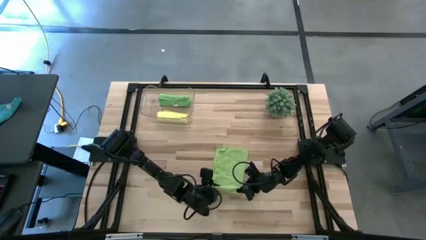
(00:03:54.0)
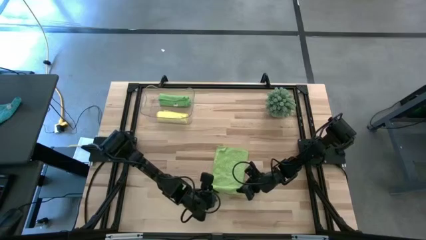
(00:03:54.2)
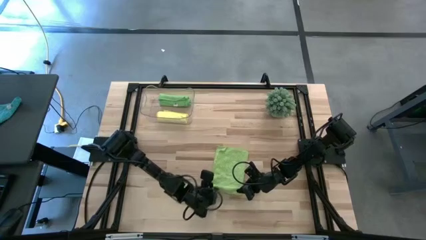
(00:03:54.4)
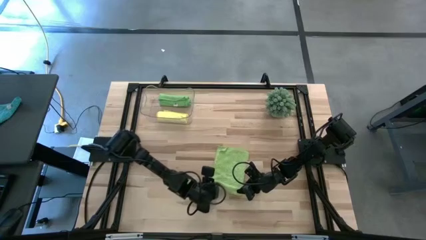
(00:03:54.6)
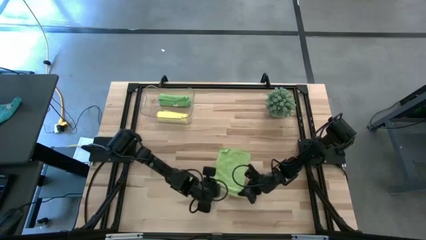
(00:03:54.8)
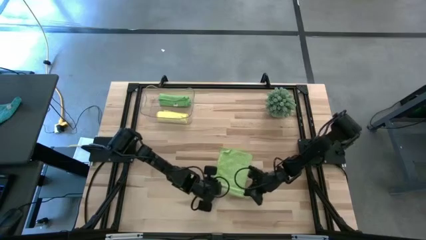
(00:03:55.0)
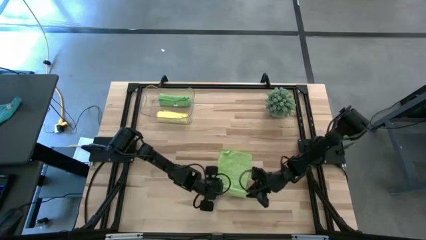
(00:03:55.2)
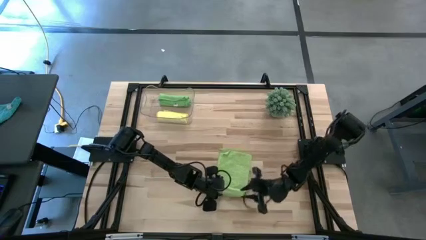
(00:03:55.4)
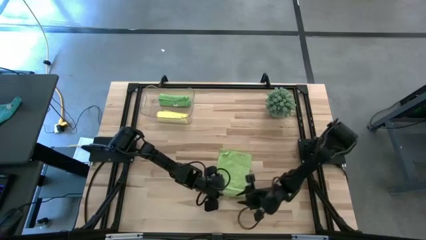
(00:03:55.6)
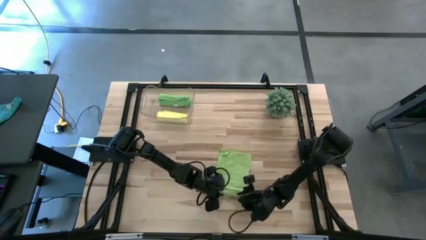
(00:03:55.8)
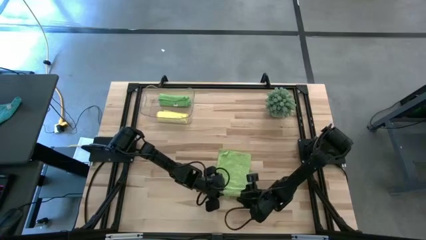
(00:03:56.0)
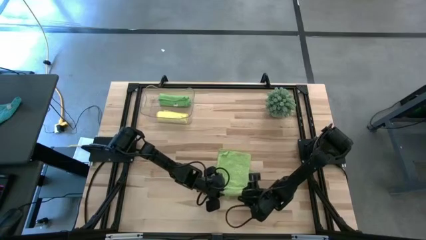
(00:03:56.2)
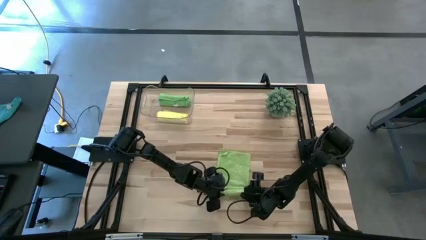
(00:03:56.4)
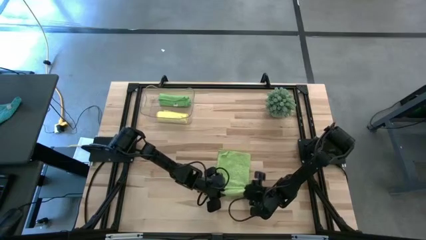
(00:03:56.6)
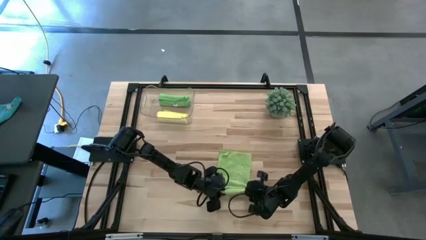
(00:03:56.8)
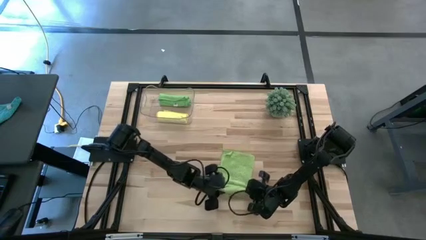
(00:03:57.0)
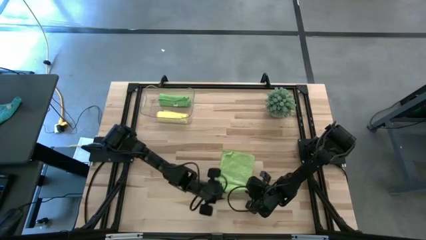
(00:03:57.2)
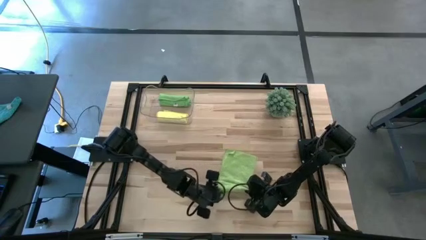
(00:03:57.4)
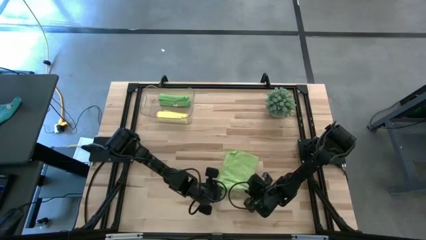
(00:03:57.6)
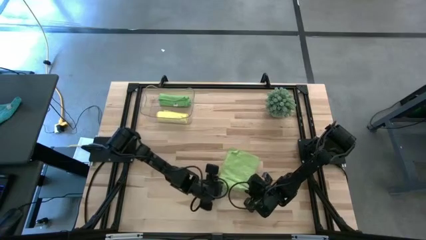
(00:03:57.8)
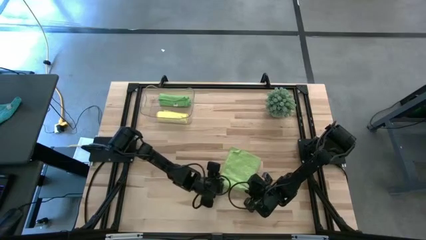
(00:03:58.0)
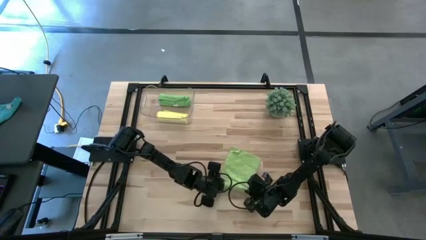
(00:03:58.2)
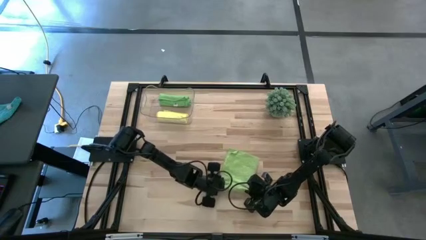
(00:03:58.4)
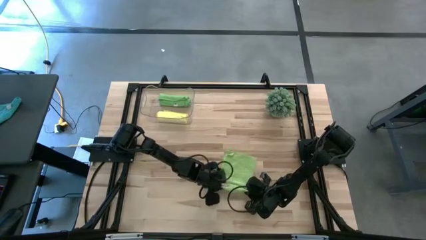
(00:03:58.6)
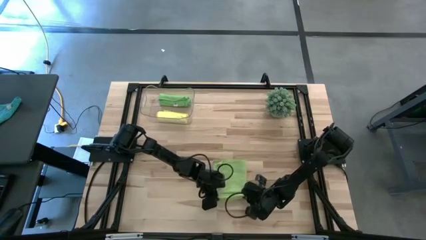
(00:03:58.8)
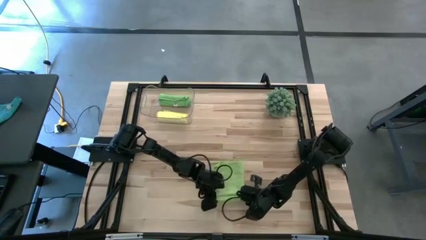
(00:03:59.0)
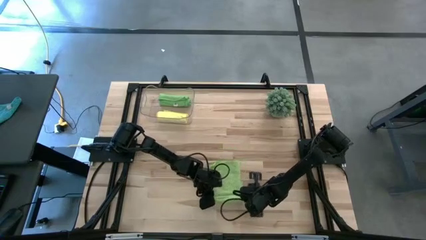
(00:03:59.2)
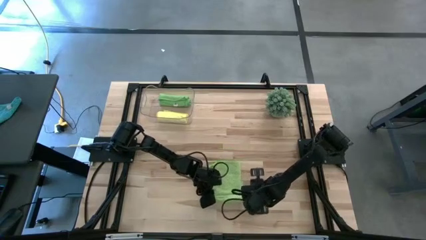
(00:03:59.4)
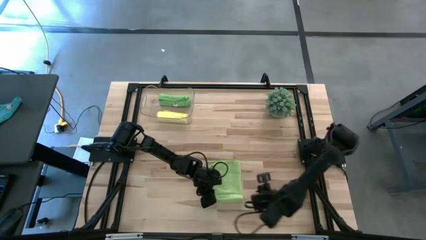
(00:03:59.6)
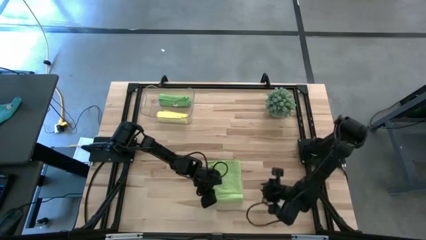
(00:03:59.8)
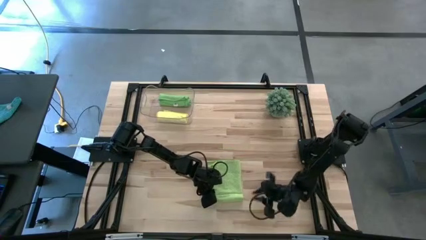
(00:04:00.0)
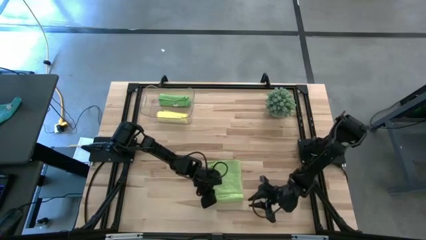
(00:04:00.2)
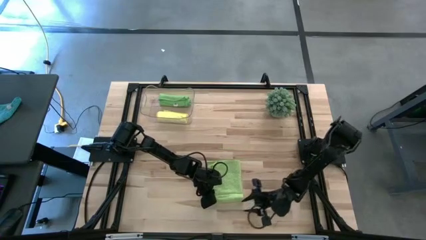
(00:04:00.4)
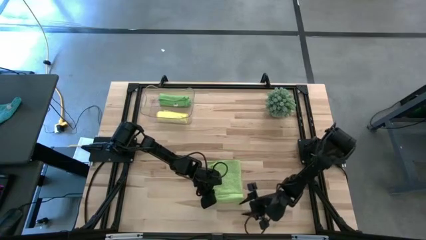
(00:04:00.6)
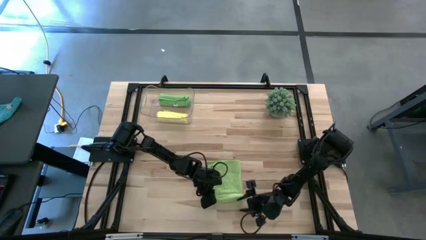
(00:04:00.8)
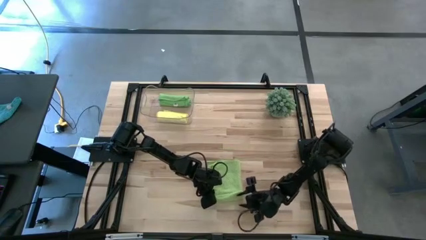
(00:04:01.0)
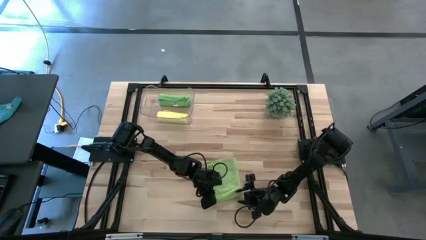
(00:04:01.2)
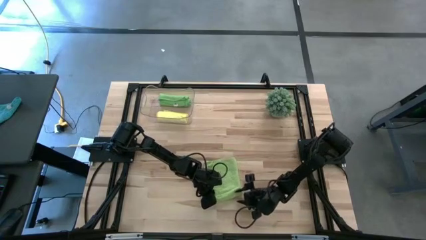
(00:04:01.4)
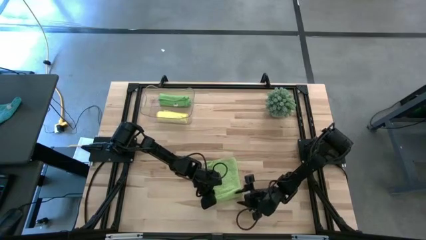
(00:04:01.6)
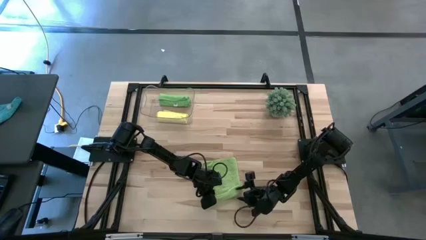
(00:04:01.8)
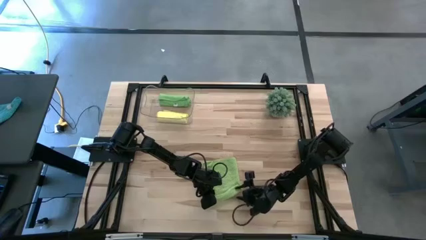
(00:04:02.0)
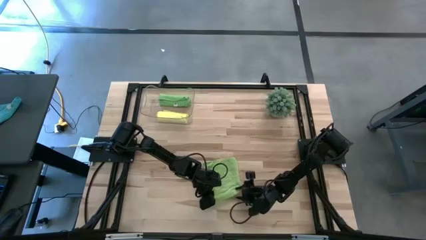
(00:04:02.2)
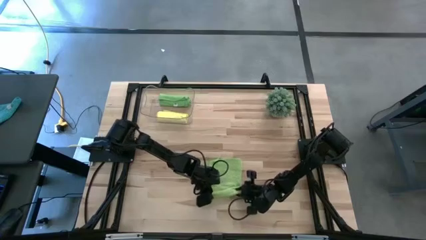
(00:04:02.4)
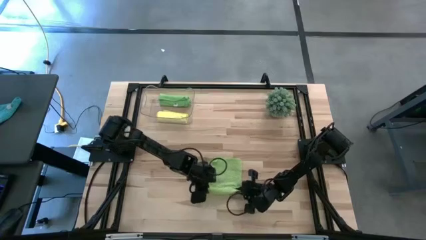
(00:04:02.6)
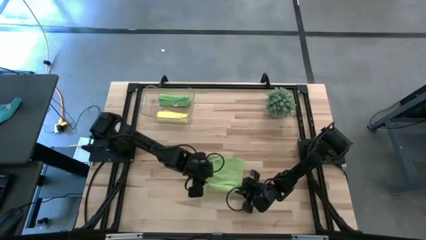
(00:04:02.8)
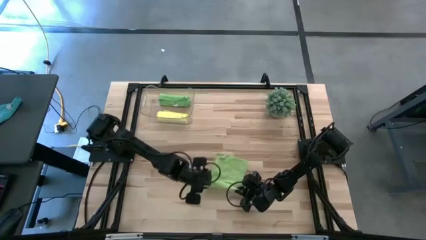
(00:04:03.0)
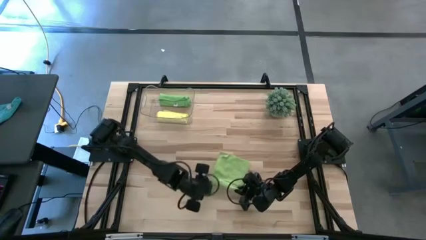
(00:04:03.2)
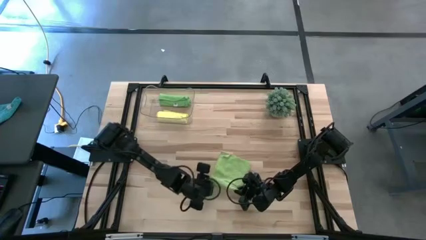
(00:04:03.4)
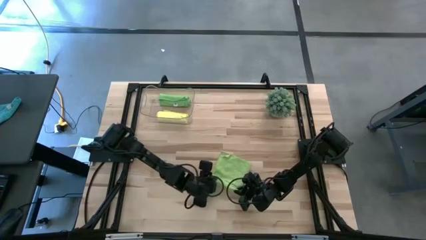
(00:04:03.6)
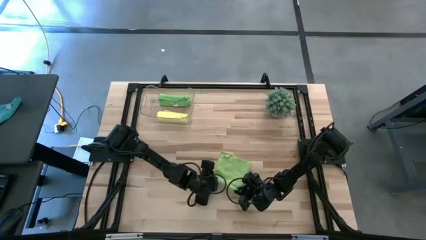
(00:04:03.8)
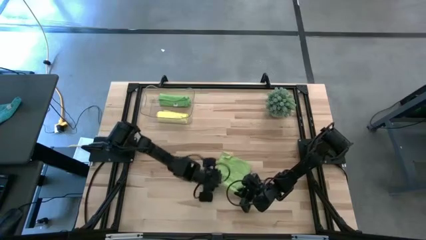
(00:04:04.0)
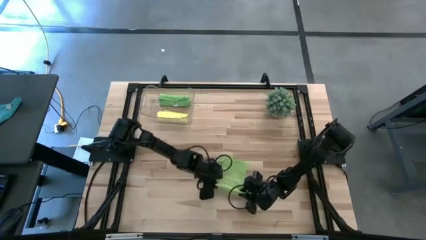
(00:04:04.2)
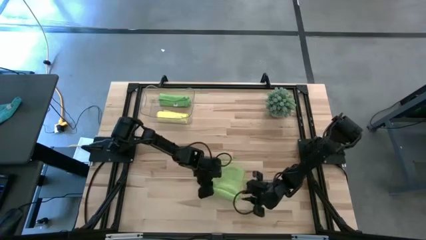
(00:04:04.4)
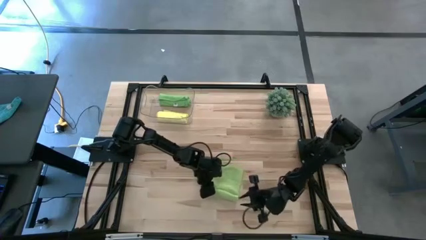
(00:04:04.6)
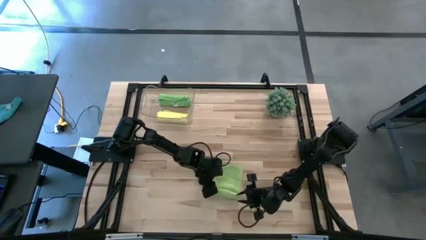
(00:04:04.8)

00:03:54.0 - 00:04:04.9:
Task: Roll microfiber towels into tight, uniform cylinder then place into a basket
Roll the light green microfiber cloth

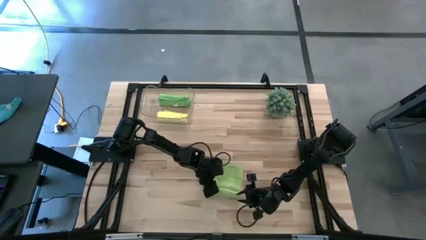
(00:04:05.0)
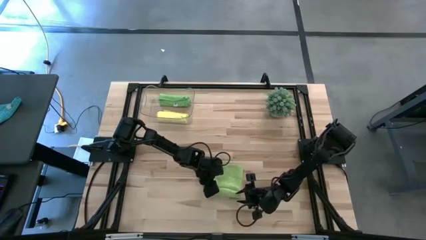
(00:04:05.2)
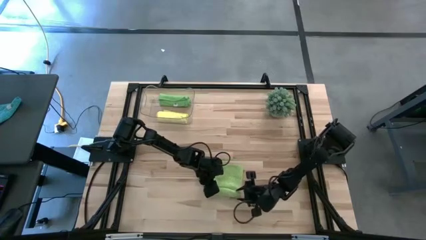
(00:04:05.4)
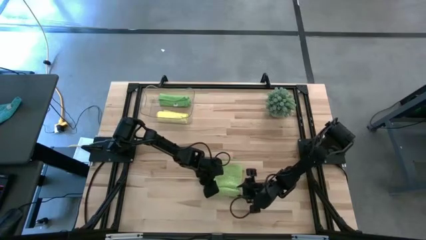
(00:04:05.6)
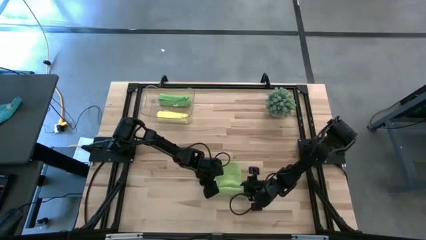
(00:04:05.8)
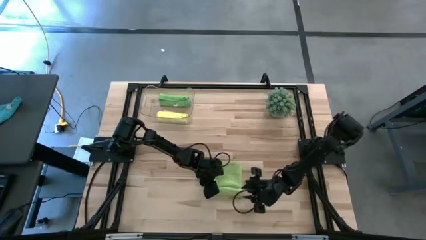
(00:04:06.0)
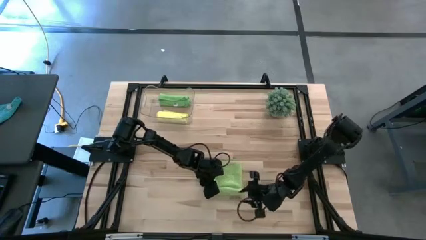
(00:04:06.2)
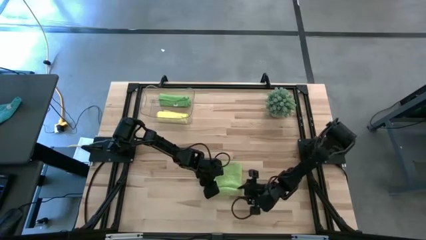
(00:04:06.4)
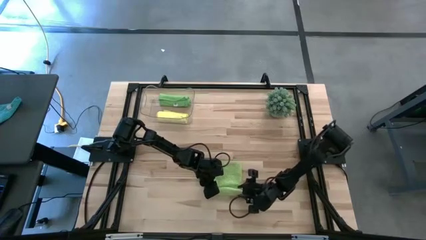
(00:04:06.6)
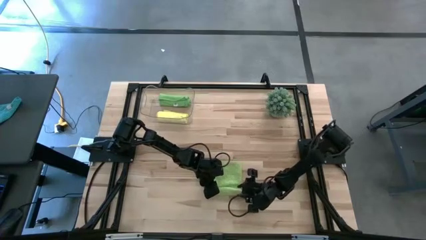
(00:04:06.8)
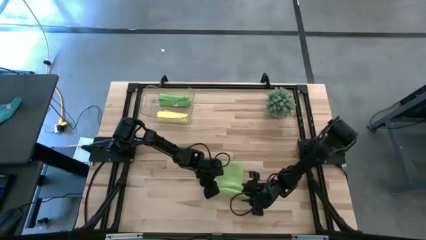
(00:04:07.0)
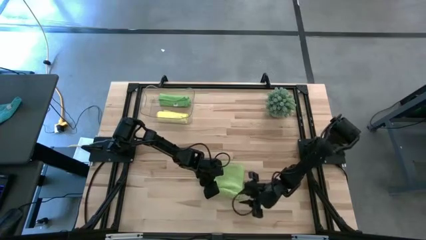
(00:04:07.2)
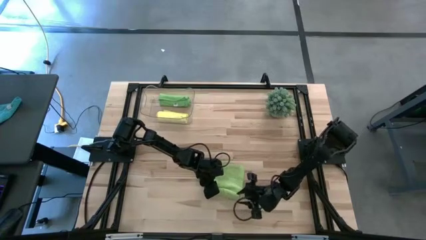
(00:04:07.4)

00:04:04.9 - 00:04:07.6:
Roll the light green microfiber cloth

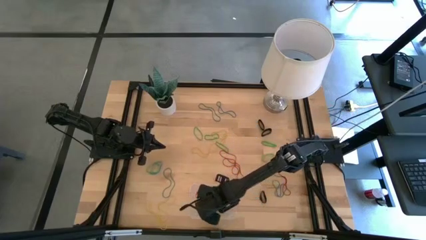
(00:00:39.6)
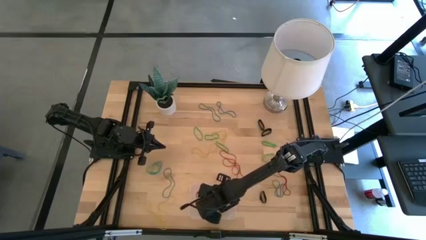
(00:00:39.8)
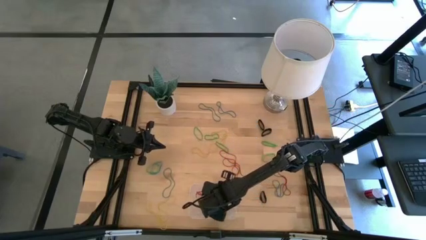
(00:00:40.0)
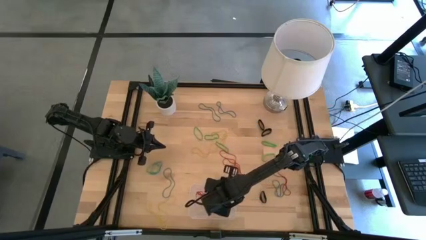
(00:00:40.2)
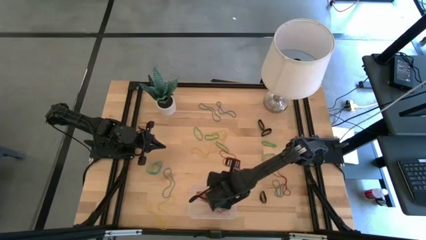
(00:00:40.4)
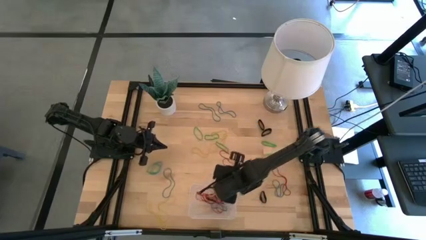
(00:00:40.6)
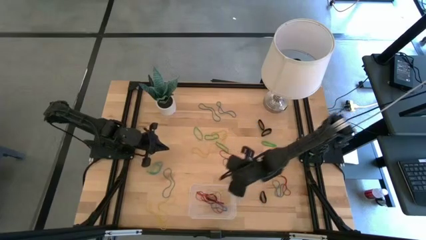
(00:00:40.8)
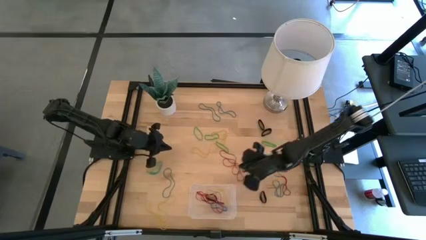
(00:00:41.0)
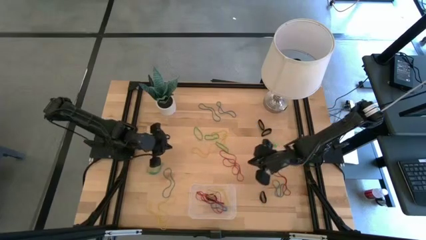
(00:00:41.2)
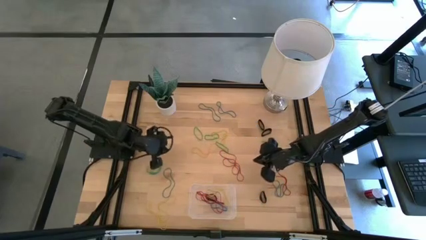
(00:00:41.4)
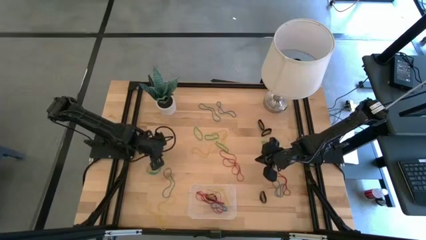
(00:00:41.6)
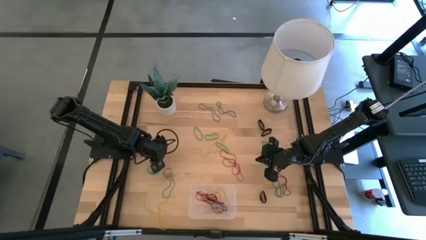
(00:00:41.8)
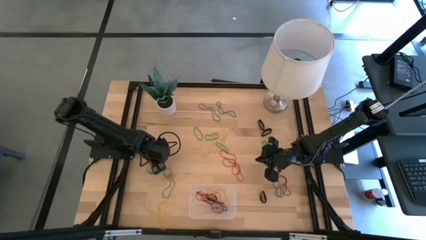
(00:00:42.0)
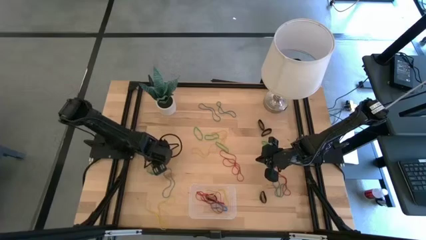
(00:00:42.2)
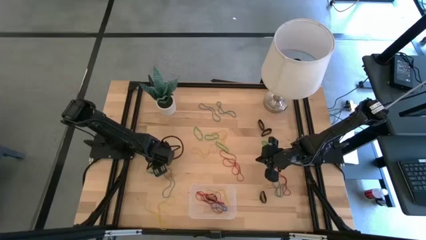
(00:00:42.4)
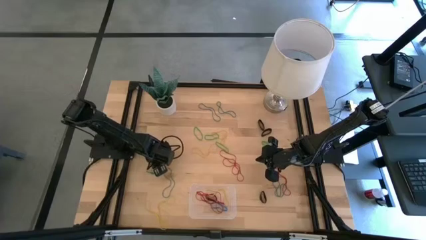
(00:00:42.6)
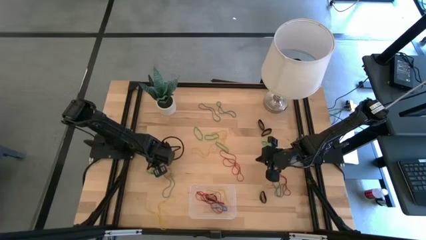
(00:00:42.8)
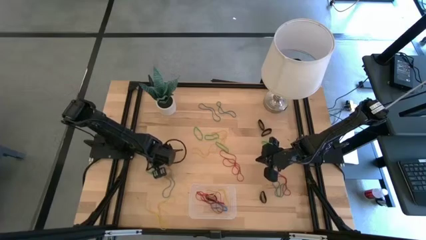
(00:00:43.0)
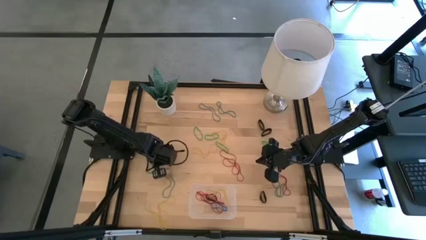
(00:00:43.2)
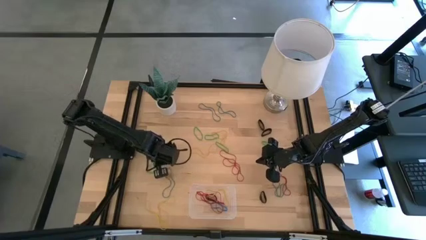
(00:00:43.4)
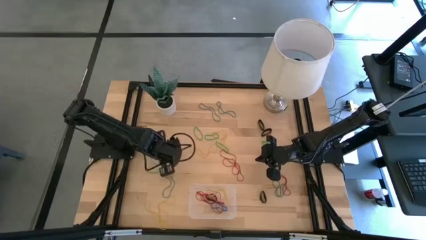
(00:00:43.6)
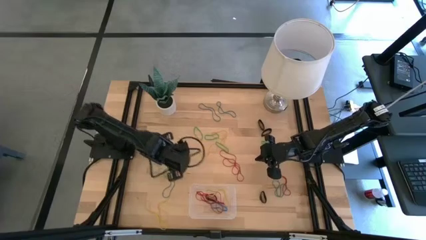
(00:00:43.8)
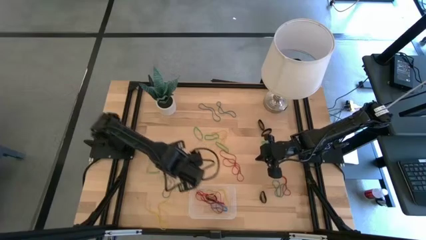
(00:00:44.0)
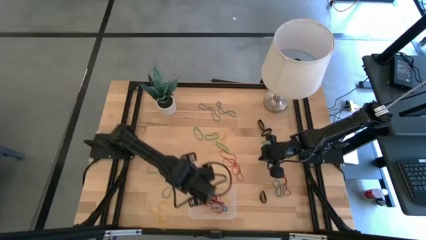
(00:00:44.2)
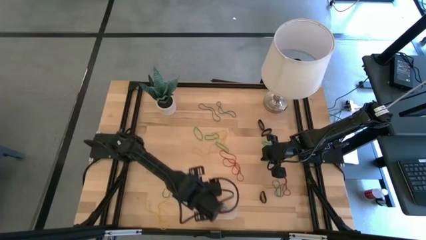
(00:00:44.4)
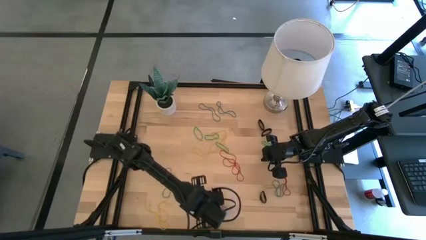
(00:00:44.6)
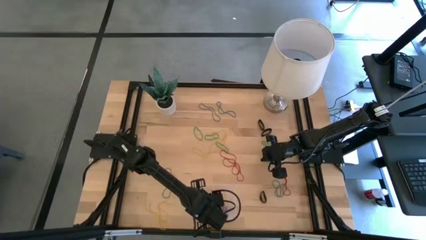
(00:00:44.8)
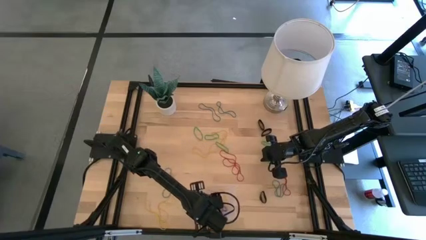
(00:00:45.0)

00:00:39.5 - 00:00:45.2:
Task: Pick and place rubber bands into bin
Put the blue rubber band into the transparent bin
